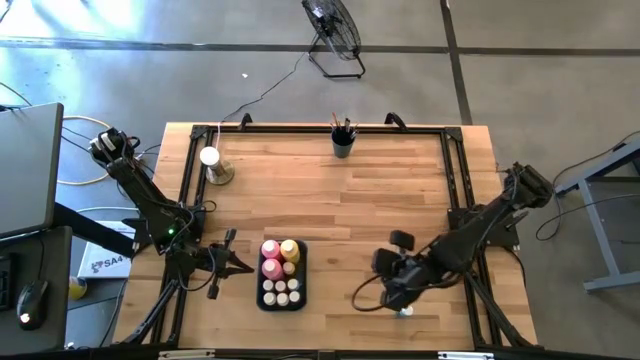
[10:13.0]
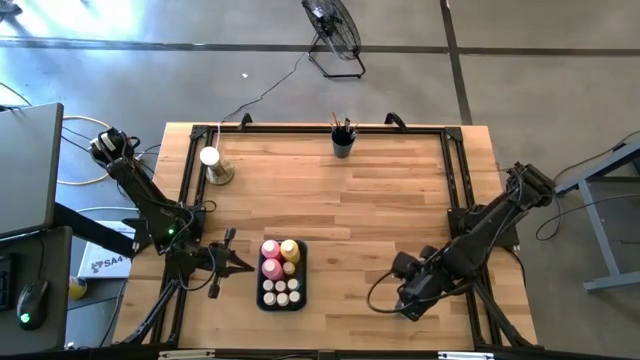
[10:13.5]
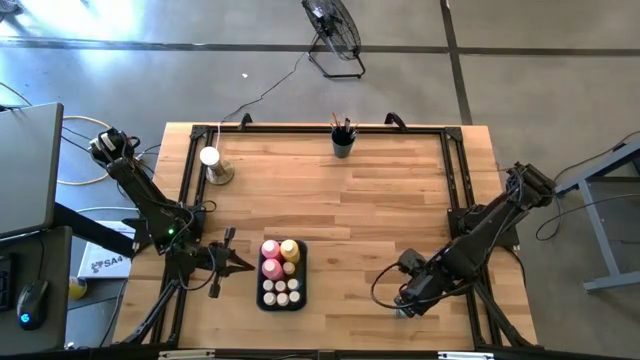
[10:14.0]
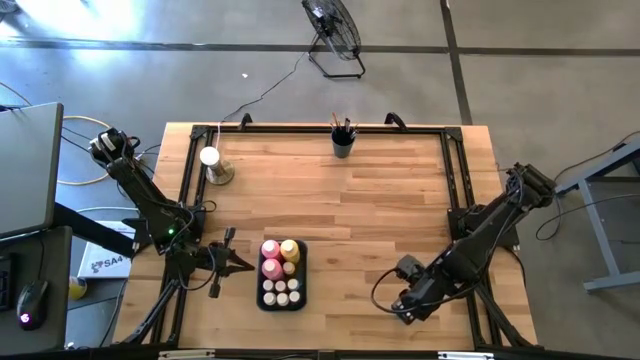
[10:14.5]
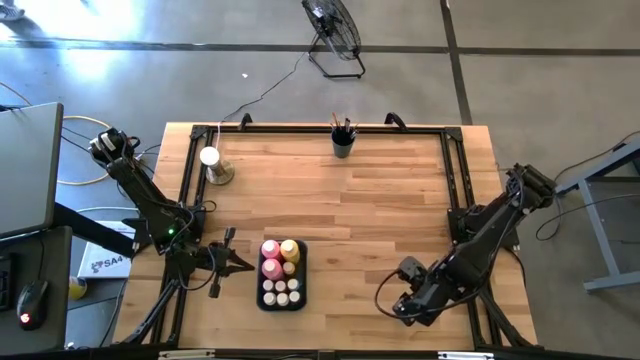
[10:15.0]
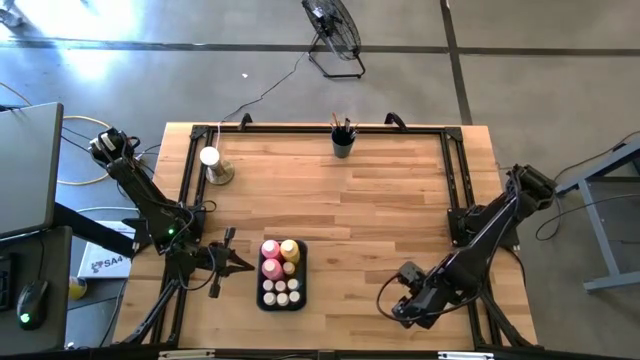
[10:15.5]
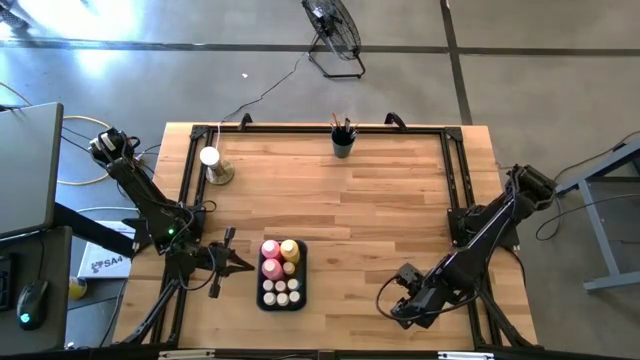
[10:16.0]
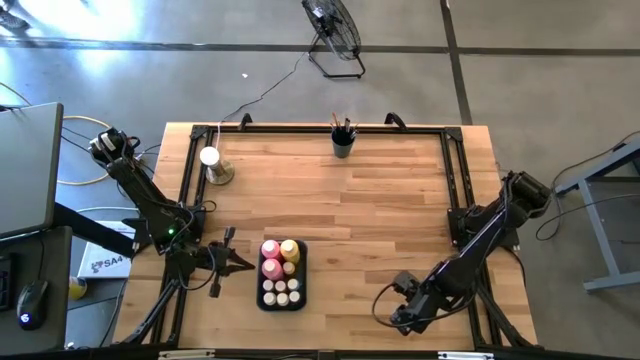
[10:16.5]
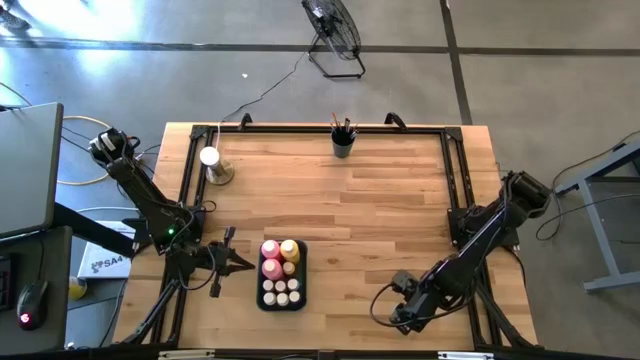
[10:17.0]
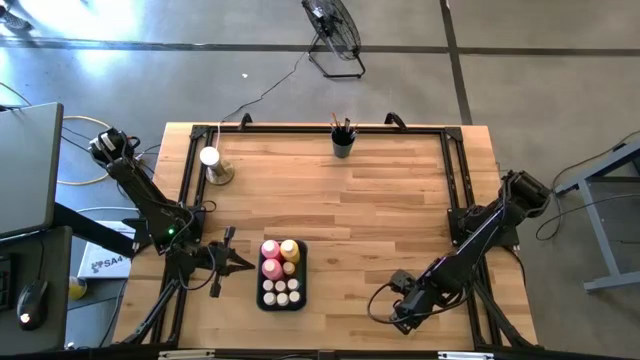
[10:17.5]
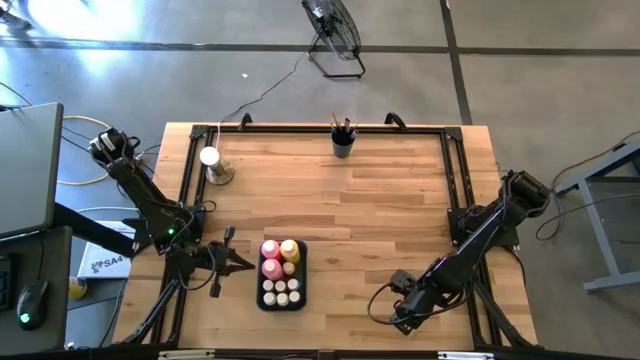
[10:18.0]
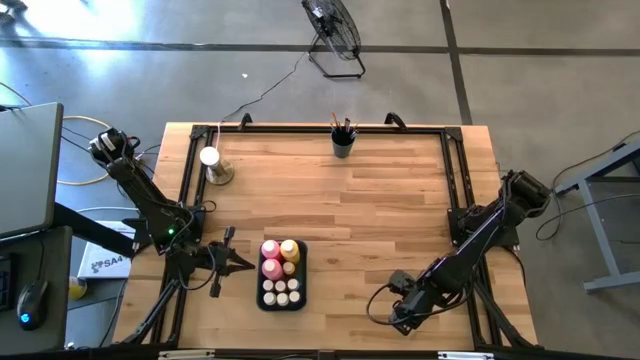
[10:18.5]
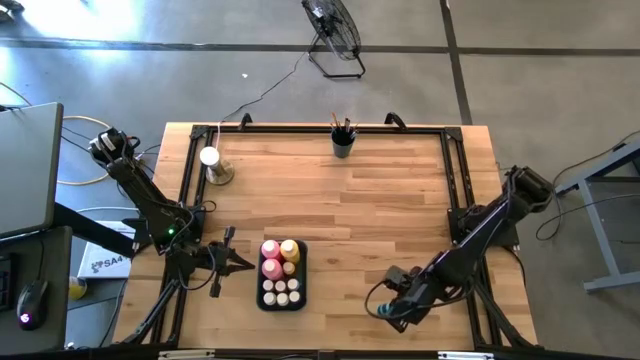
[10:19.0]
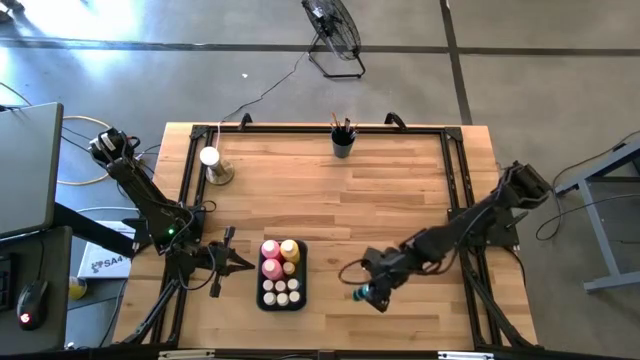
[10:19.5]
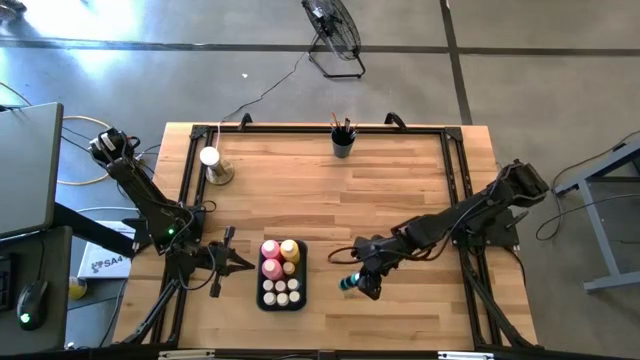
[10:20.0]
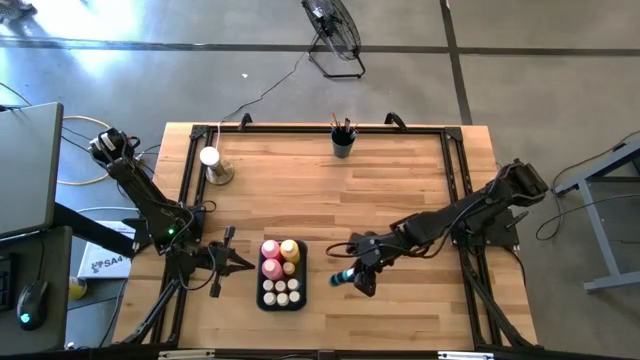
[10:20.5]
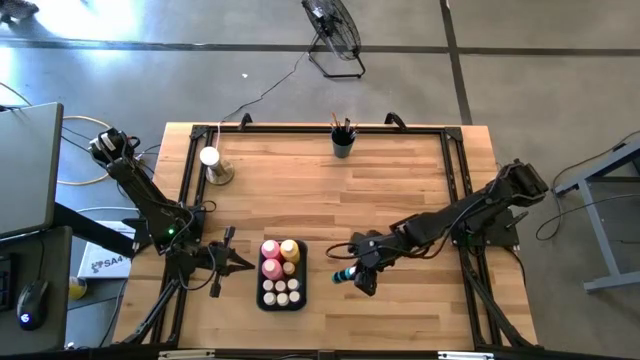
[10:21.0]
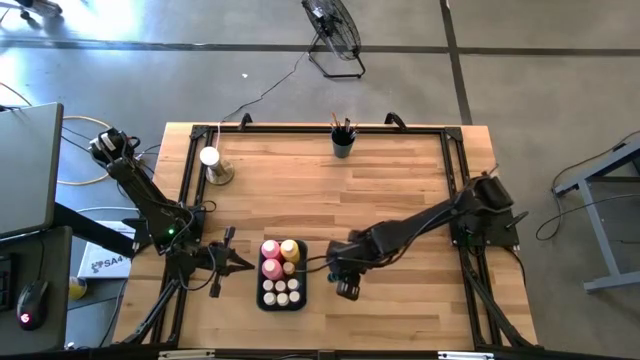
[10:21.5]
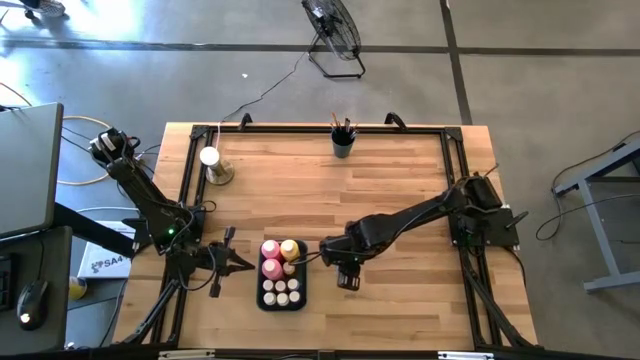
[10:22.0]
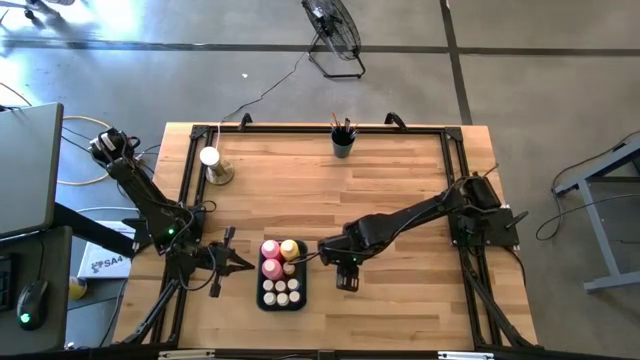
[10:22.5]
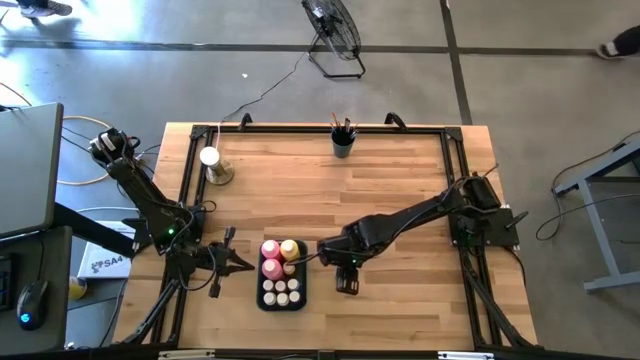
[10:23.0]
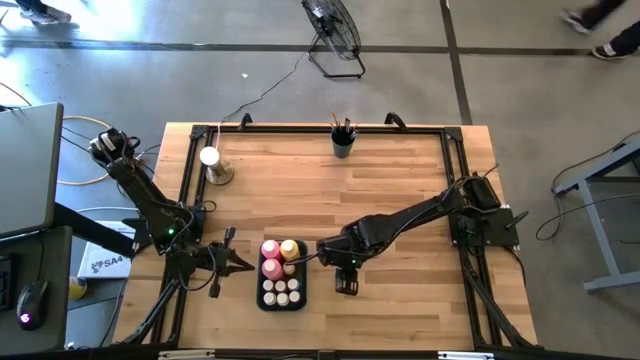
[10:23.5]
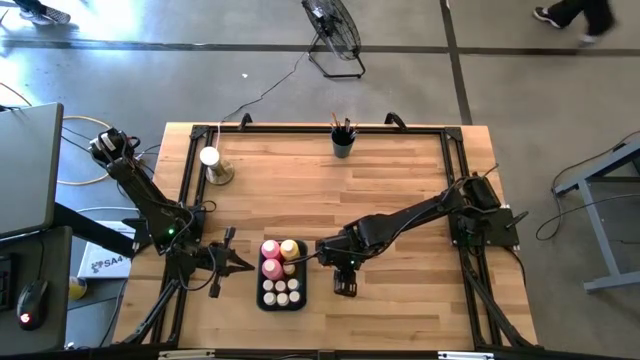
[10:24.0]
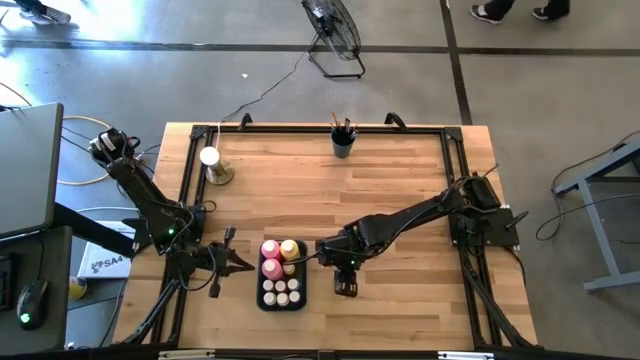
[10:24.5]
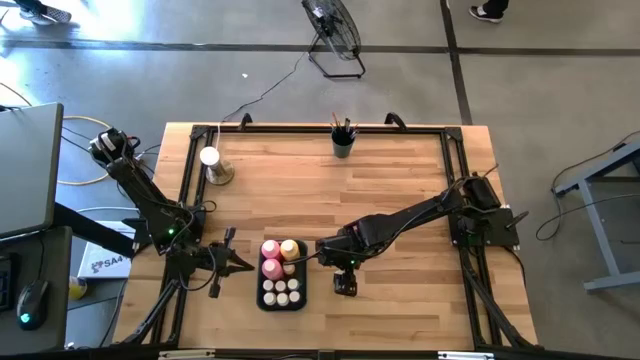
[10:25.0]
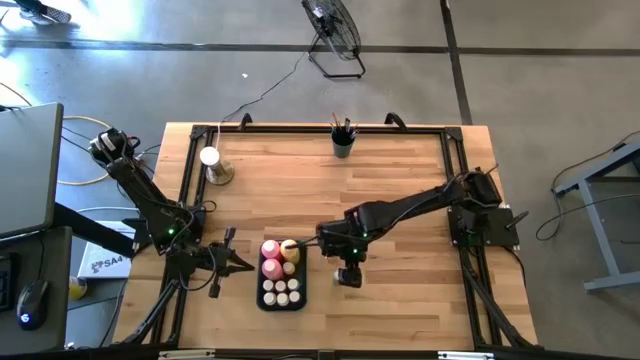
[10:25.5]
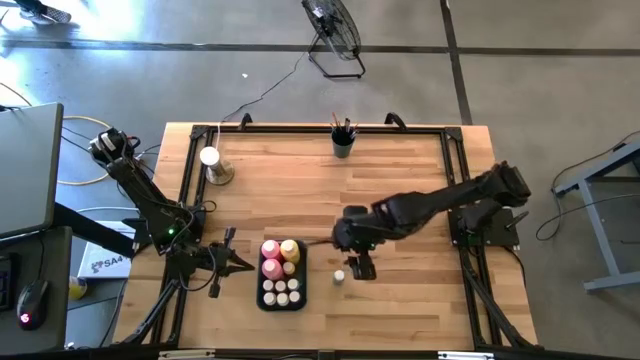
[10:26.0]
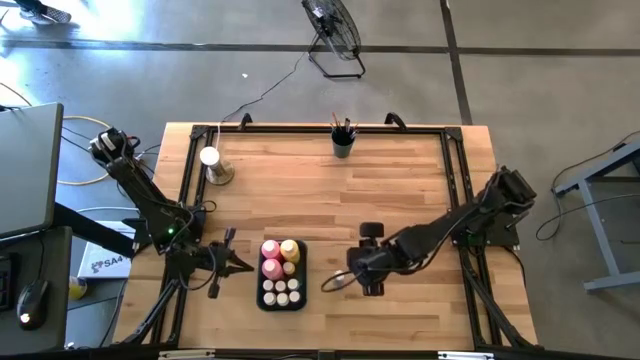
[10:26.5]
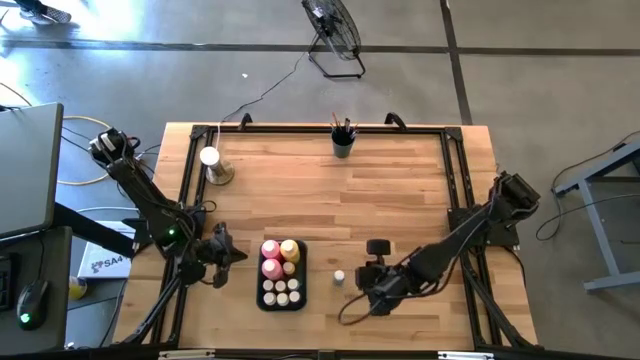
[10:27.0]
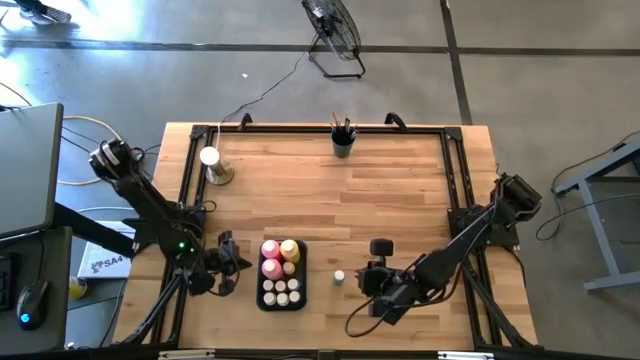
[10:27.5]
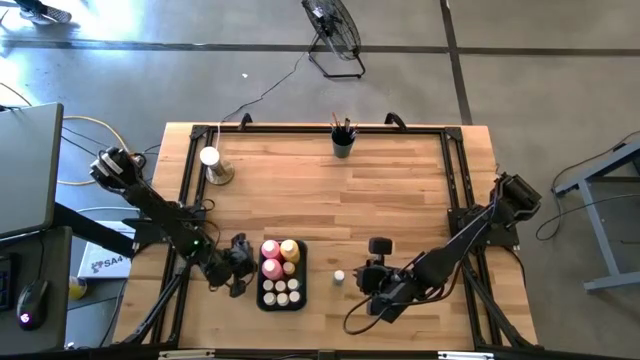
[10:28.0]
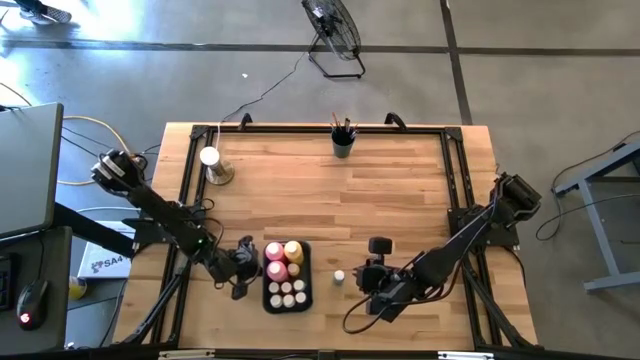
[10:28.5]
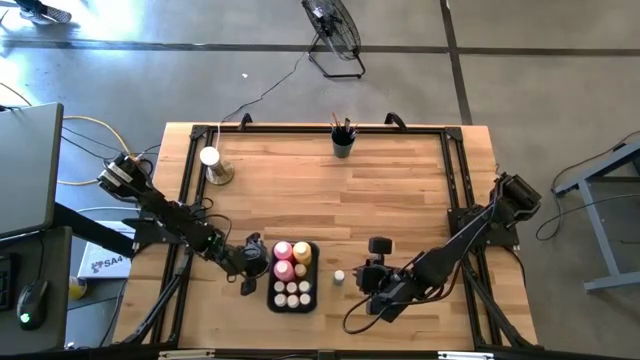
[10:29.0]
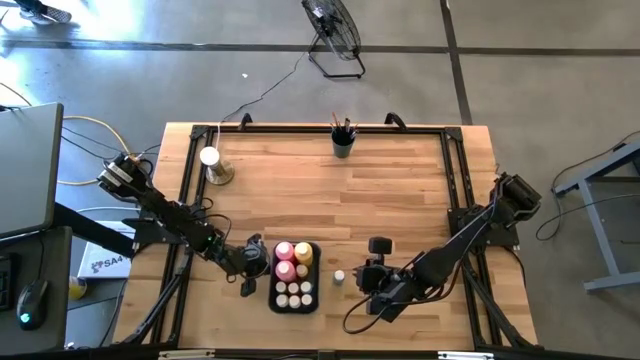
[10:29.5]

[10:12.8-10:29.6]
Task: Pick & Place Paint Supplies
Put the green paint bottle into the green bin
